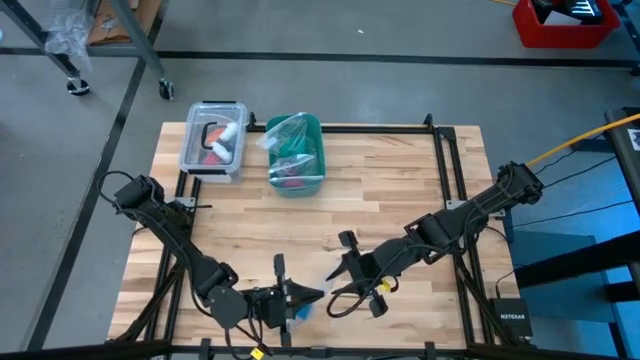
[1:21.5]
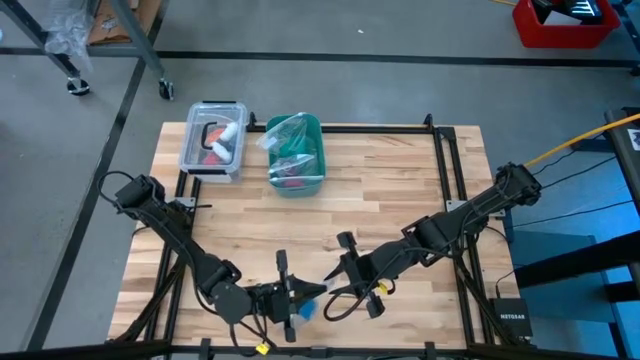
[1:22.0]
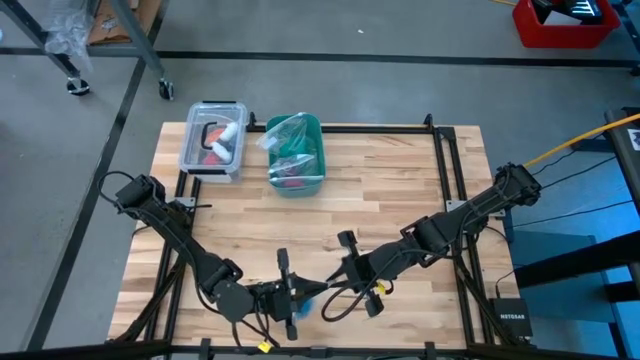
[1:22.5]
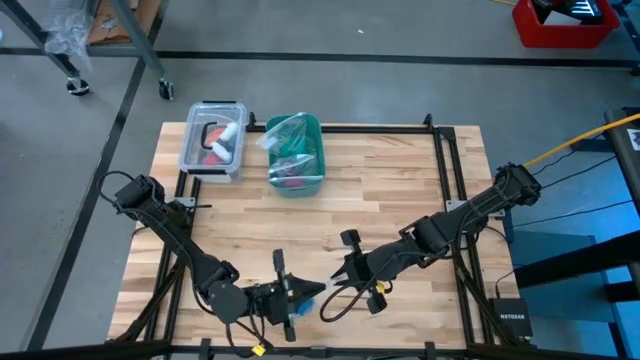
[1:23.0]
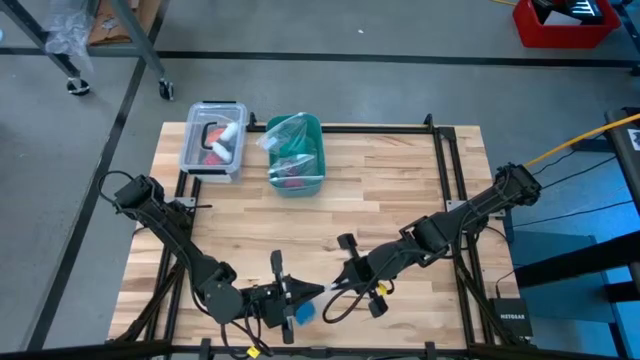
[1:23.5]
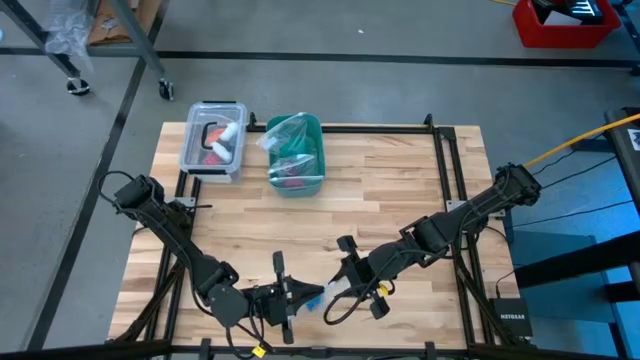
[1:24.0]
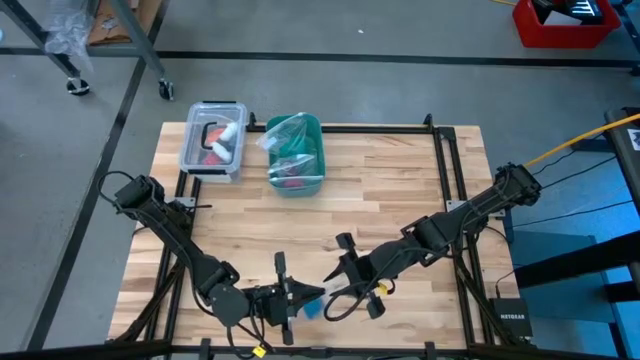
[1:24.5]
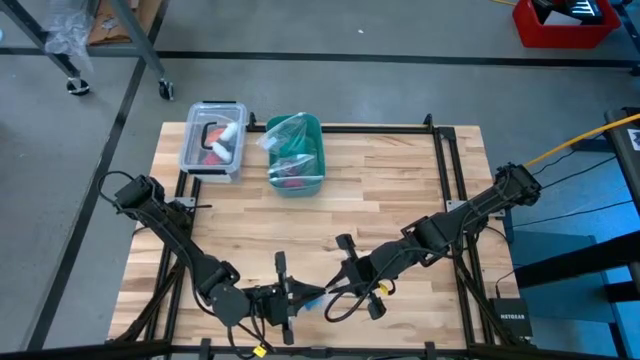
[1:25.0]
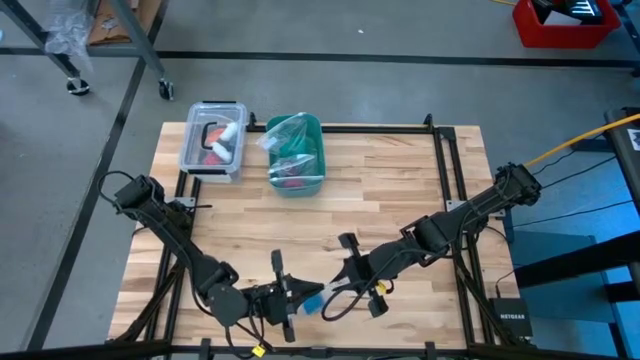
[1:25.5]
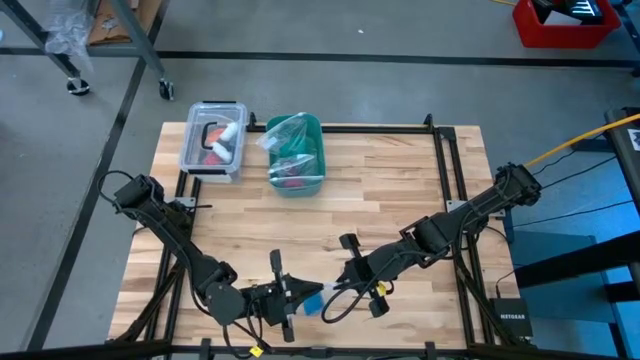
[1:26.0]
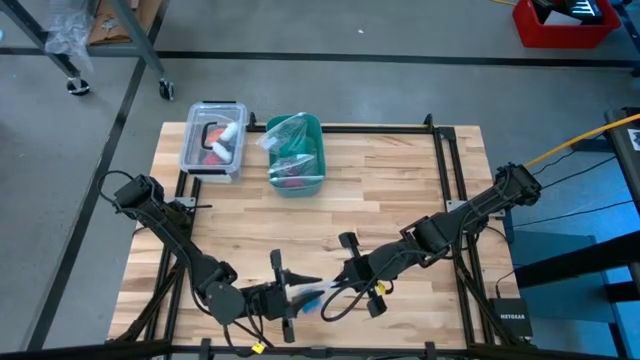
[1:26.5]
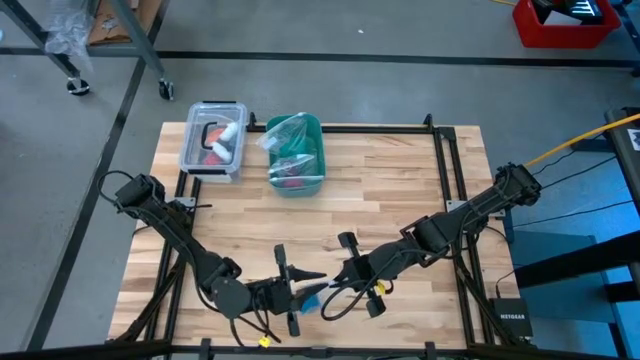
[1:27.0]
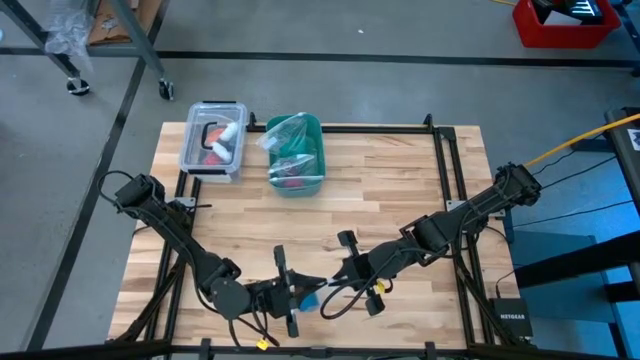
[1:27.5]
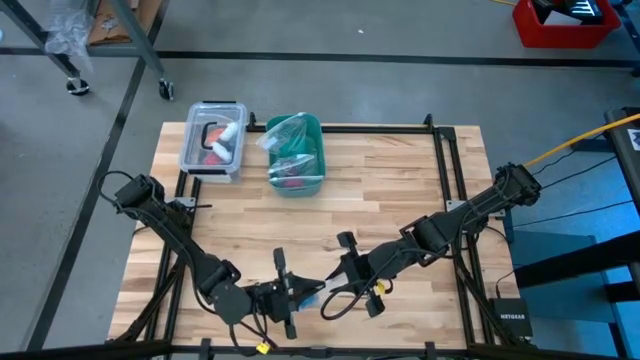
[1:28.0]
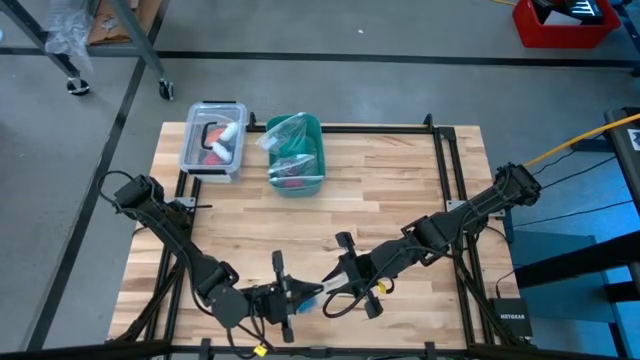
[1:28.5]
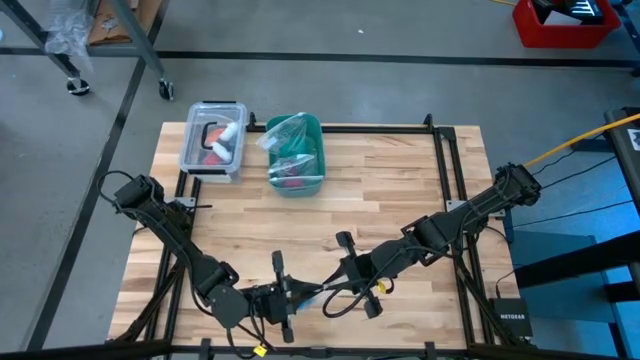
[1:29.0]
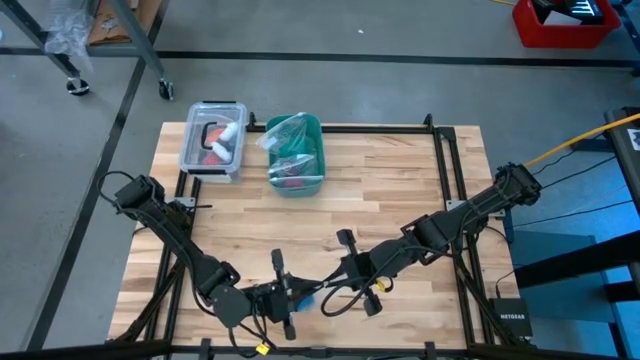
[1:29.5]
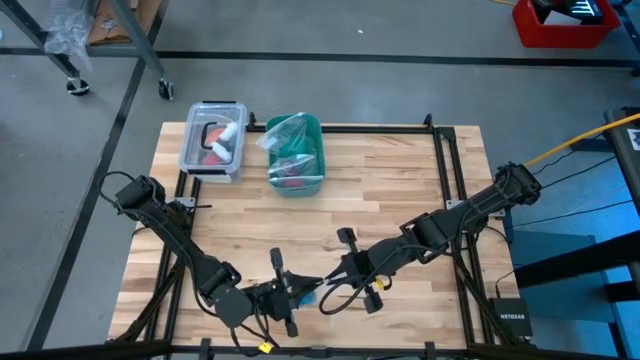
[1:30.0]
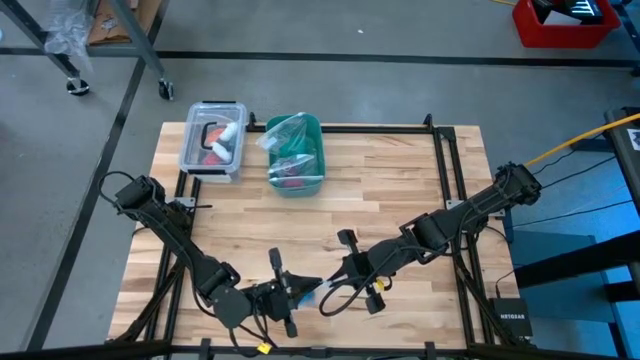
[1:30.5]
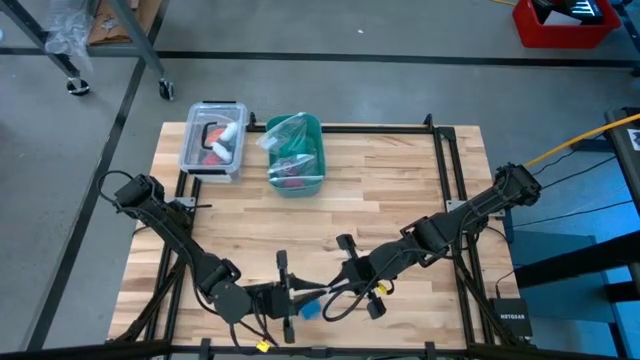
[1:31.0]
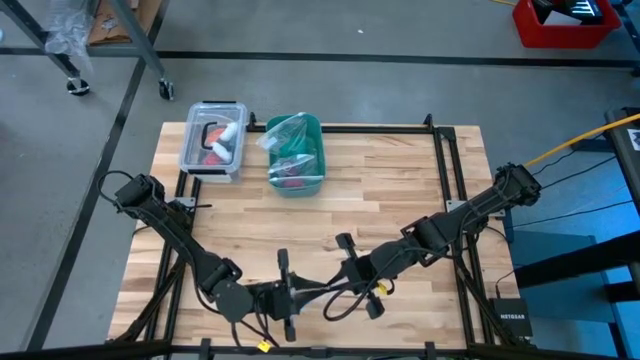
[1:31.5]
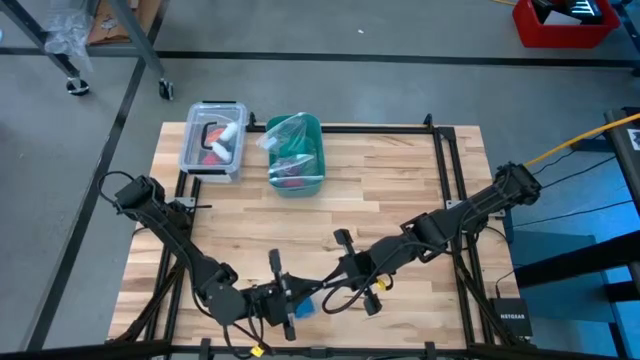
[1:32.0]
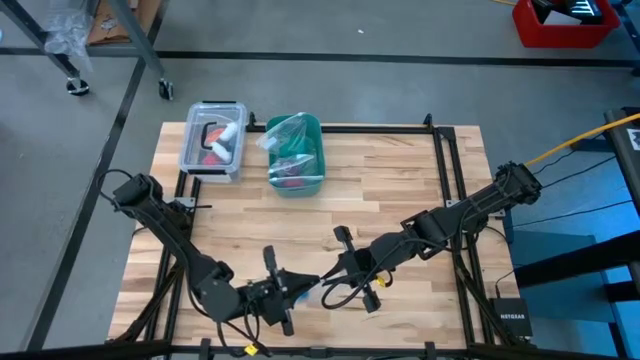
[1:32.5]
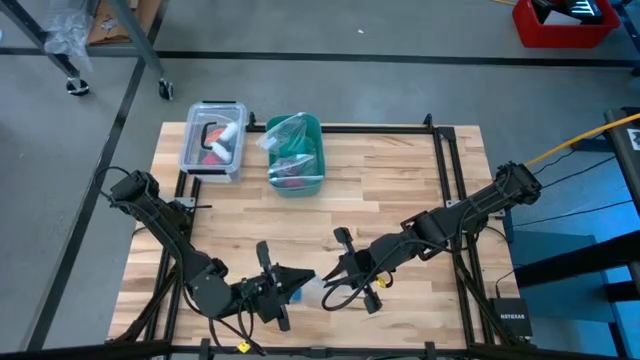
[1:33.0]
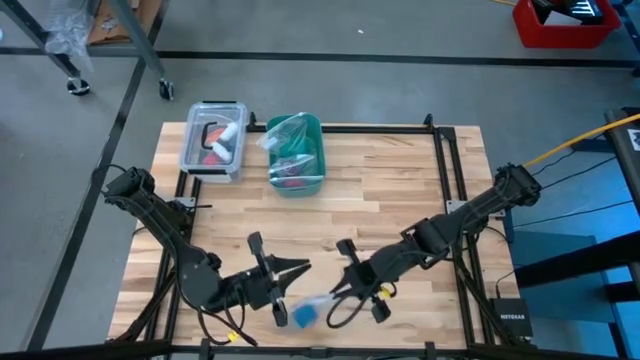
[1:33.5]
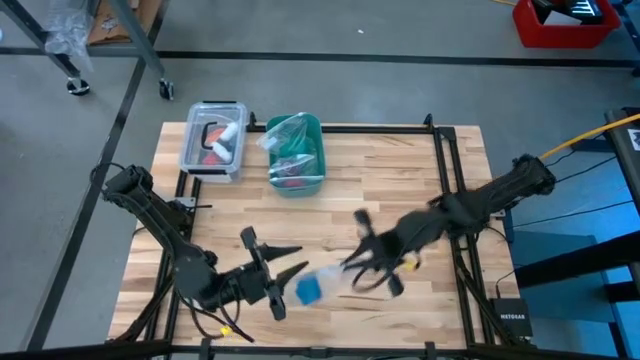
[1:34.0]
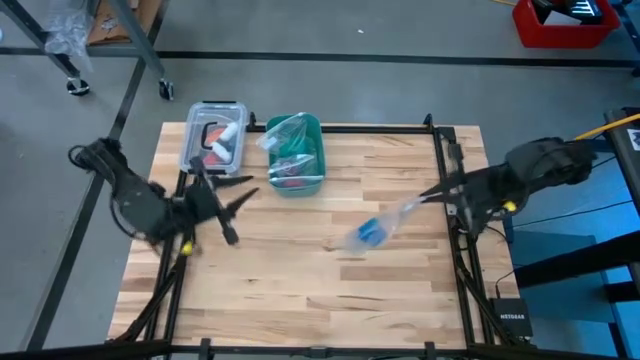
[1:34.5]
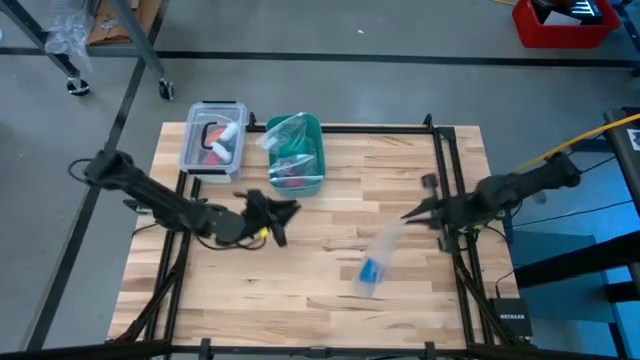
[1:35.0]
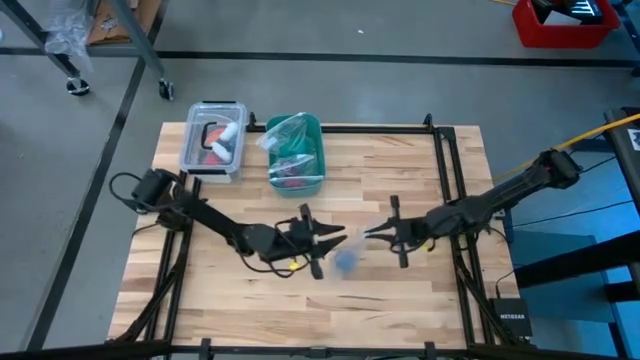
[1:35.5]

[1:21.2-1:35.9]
Task: Roll bandage
Close the transparent zip bag

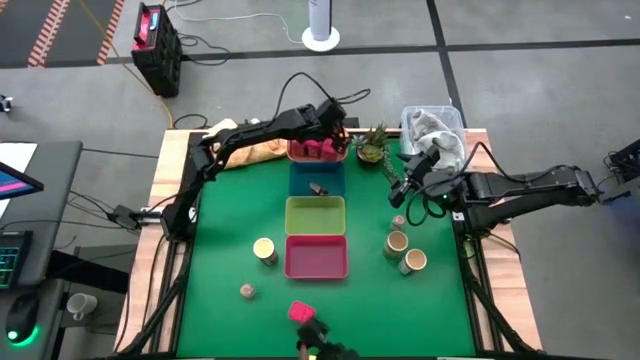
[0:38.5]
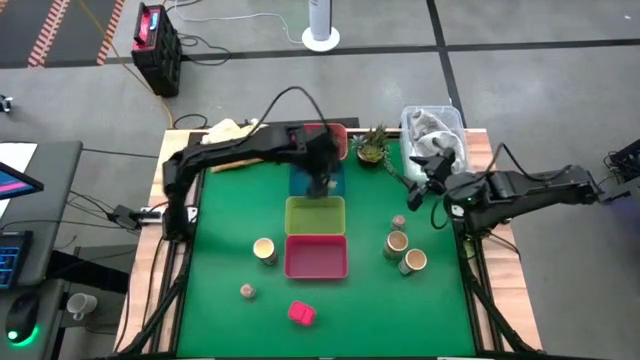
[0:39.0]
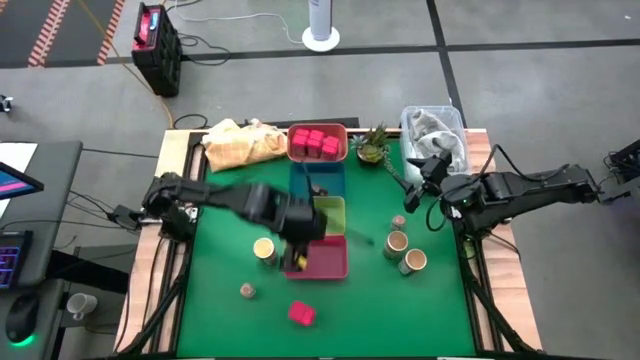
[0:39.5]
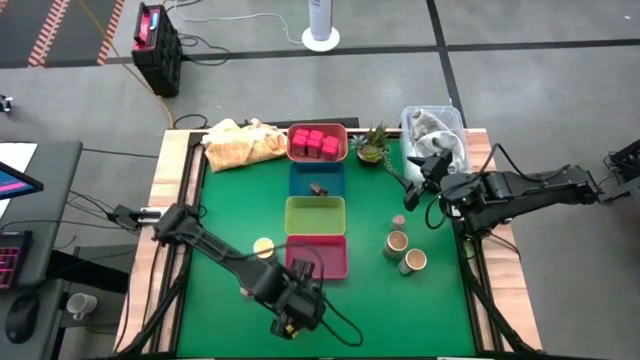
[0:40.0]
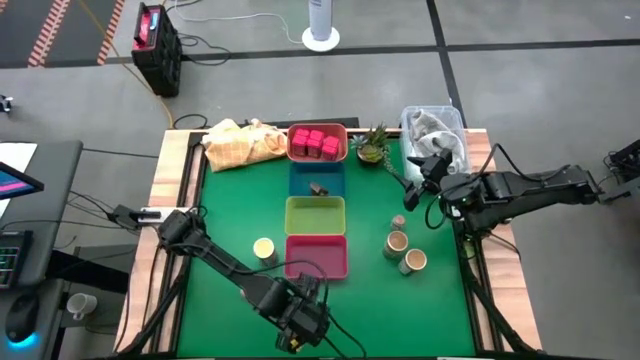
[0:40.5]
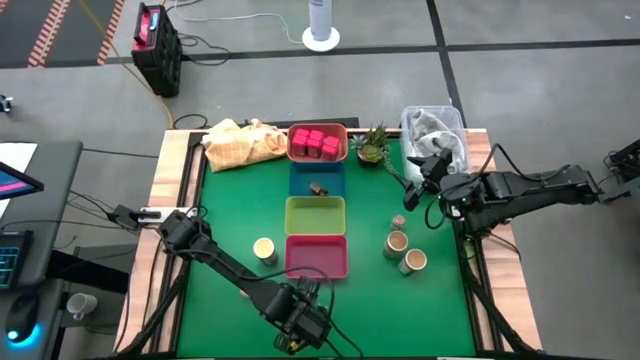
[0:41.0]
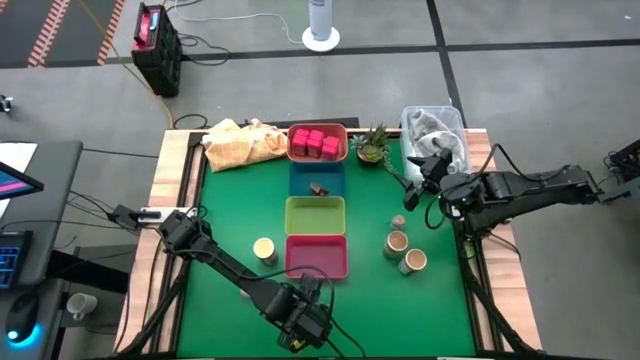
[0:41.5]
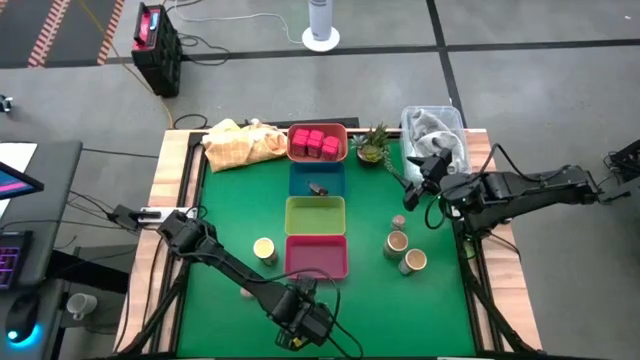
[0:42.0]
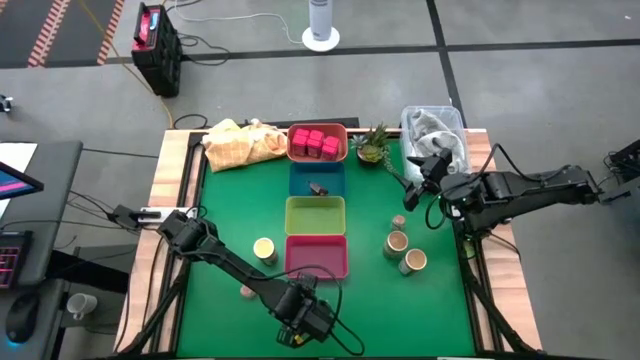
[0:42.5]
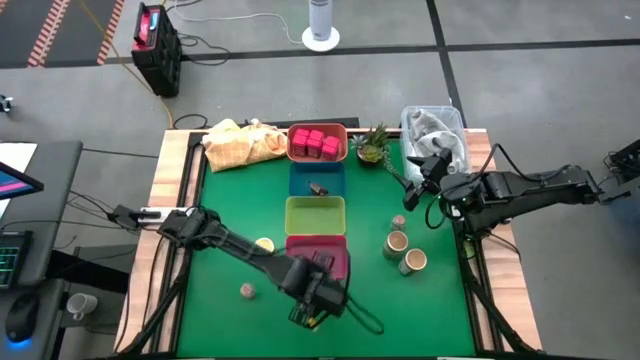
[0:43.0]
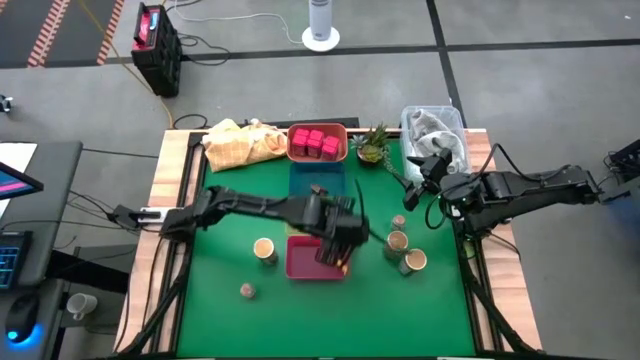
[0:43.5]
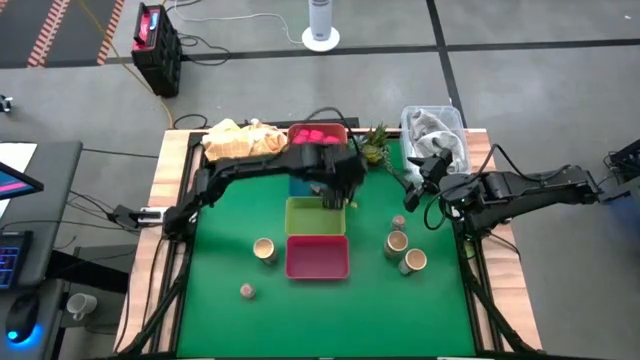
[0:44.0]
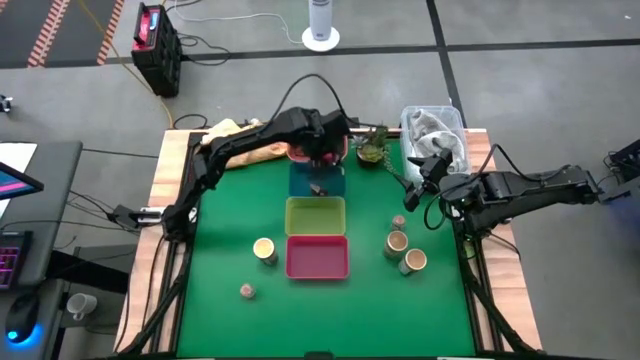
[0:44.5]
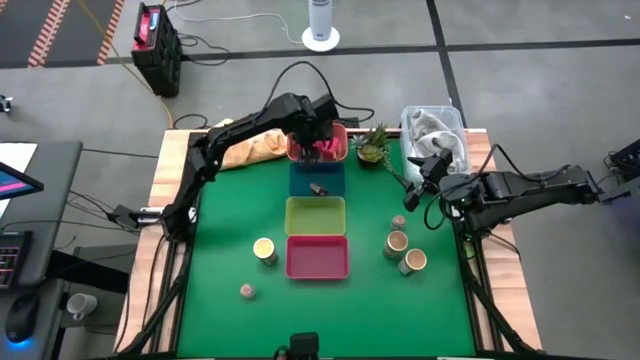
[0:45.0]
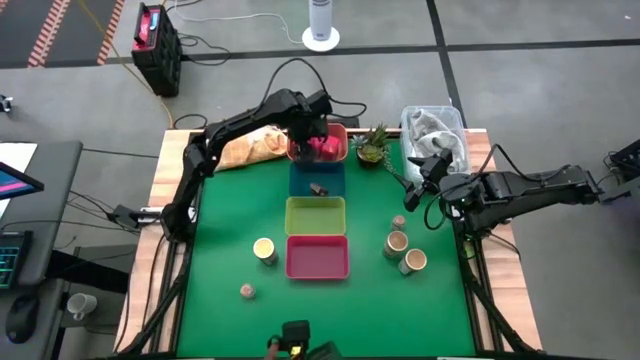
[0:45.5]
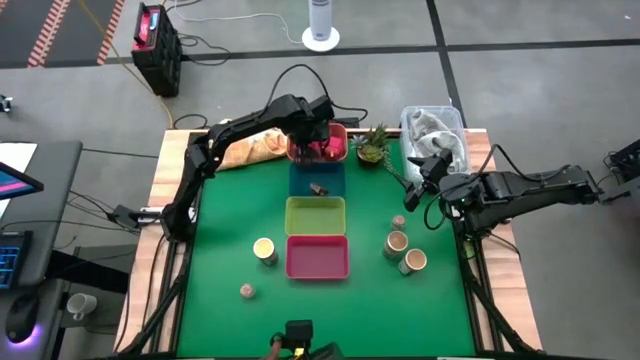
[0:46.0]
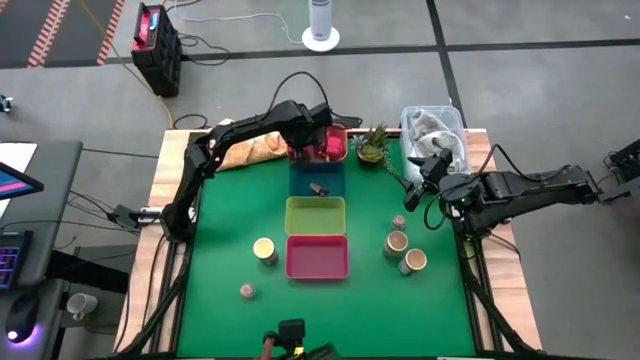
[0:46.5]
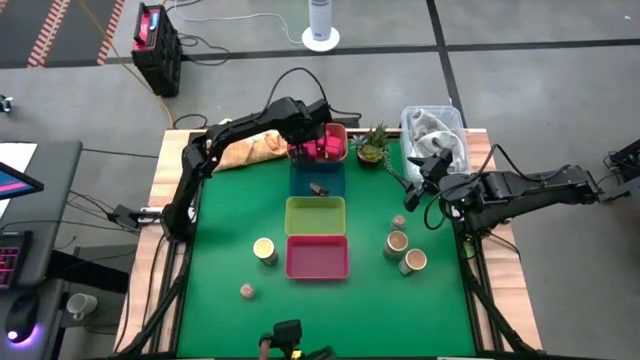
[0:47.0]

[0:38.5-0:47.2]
Task: Sort spices by type
Put the red seasoning can into the orange bin
